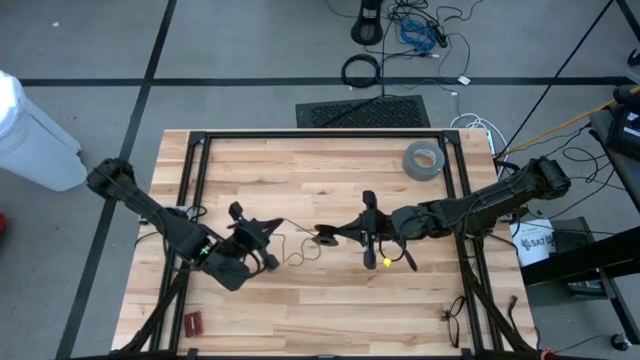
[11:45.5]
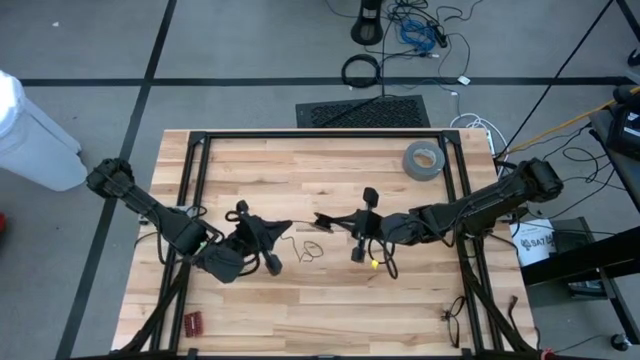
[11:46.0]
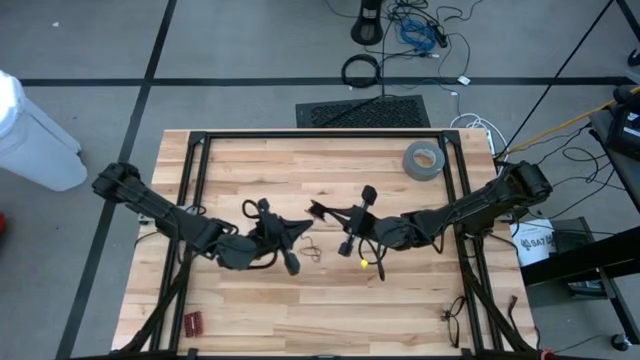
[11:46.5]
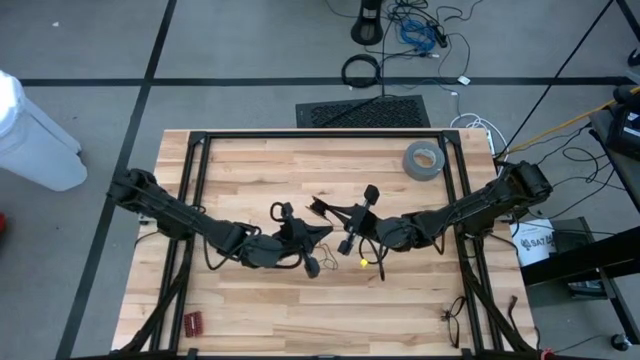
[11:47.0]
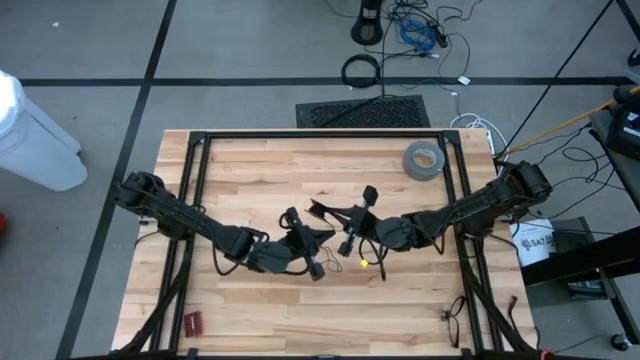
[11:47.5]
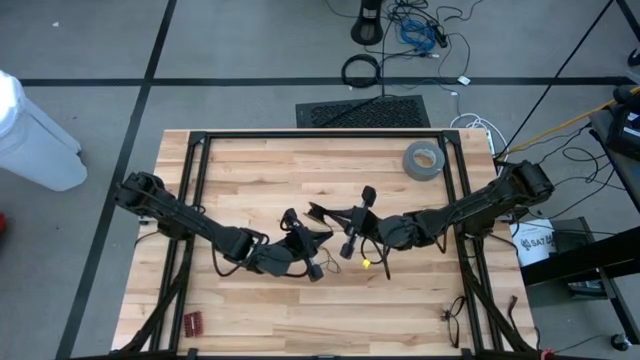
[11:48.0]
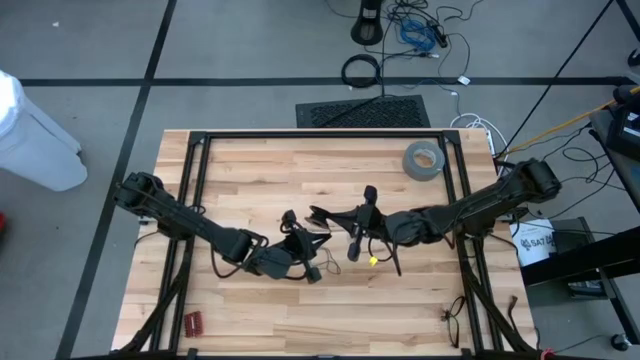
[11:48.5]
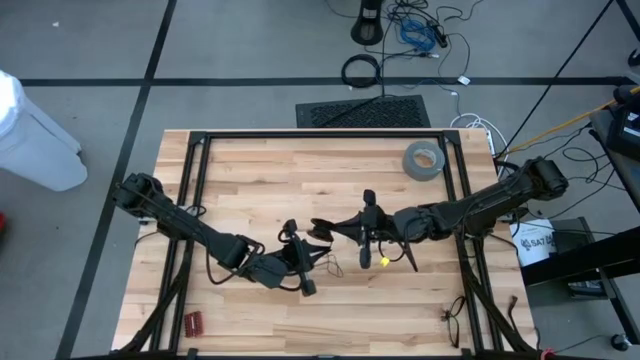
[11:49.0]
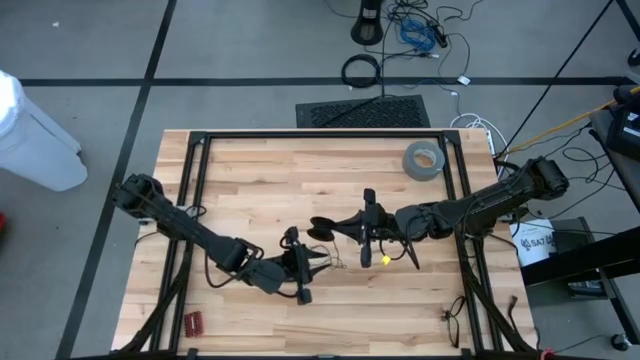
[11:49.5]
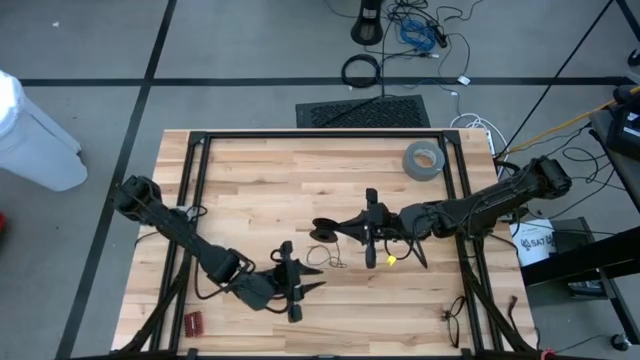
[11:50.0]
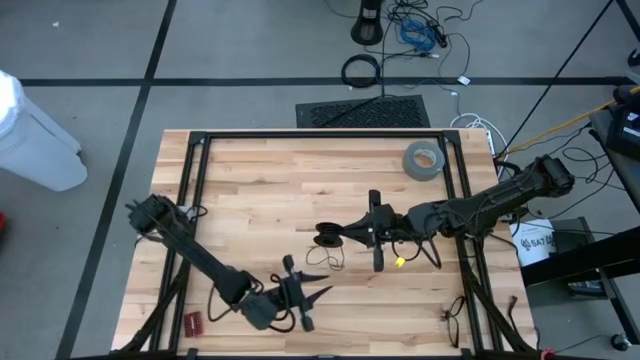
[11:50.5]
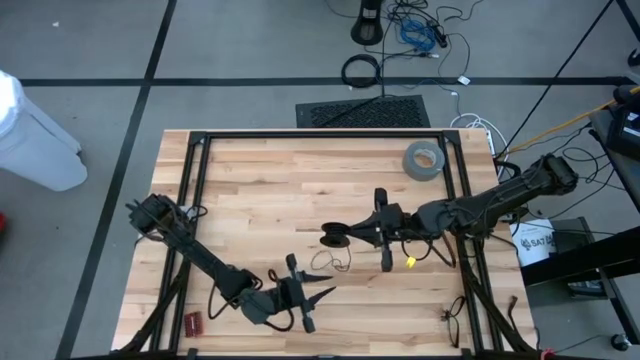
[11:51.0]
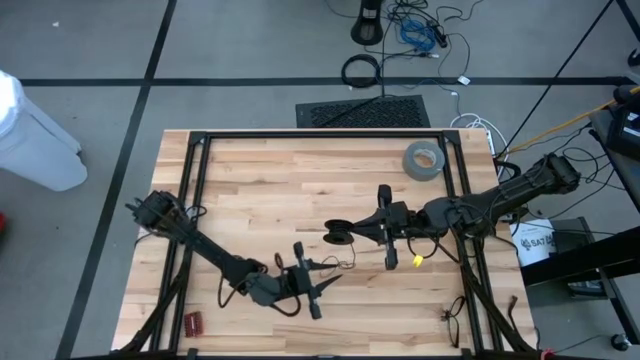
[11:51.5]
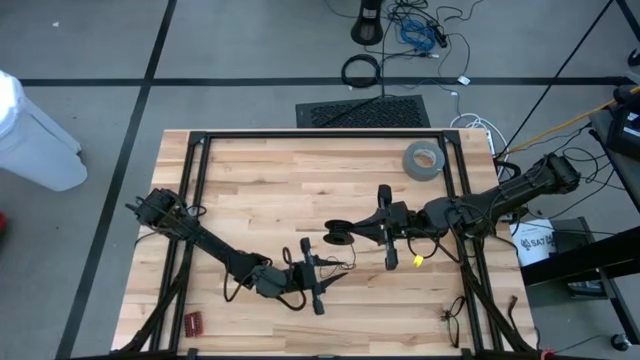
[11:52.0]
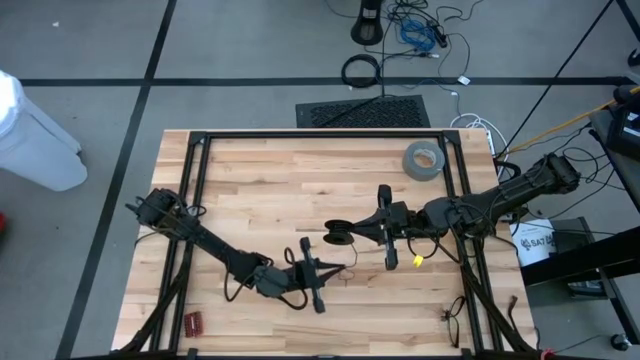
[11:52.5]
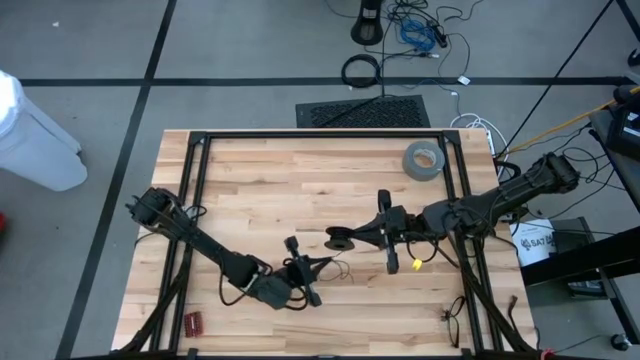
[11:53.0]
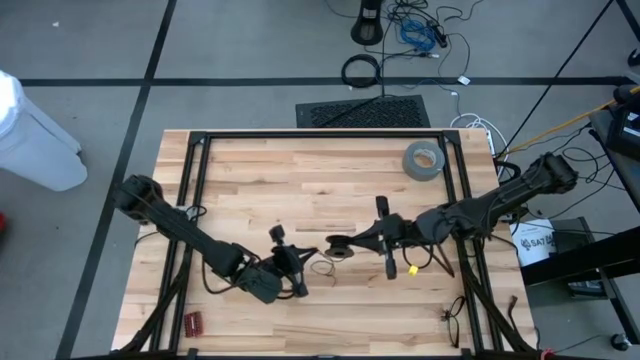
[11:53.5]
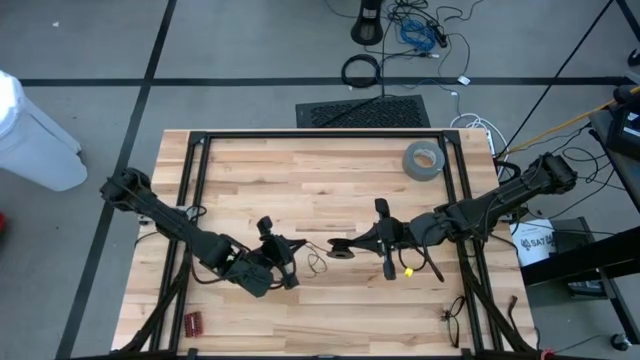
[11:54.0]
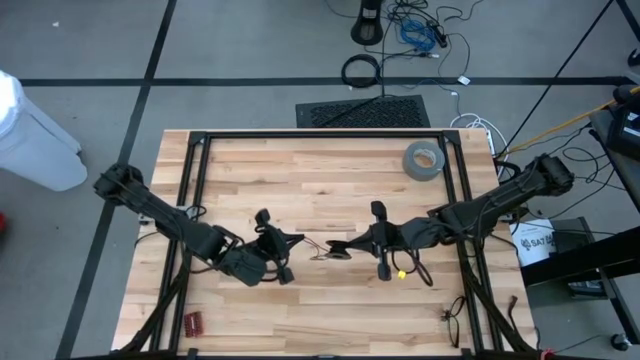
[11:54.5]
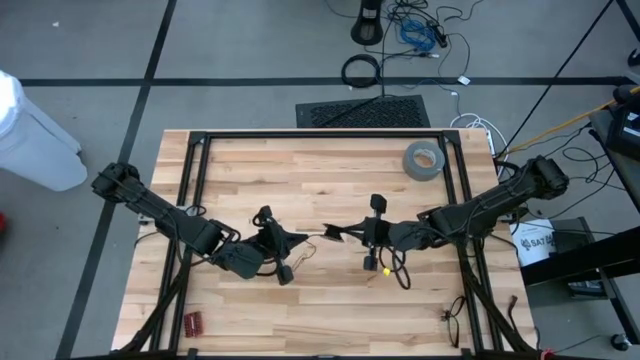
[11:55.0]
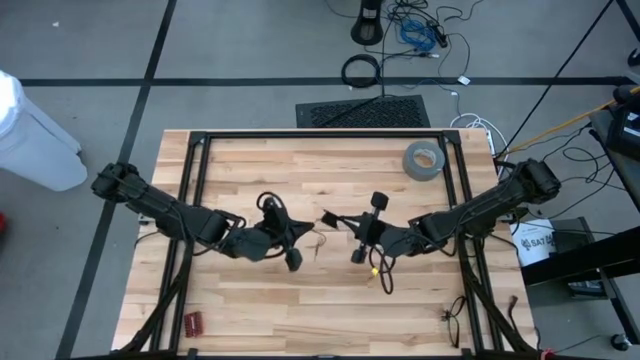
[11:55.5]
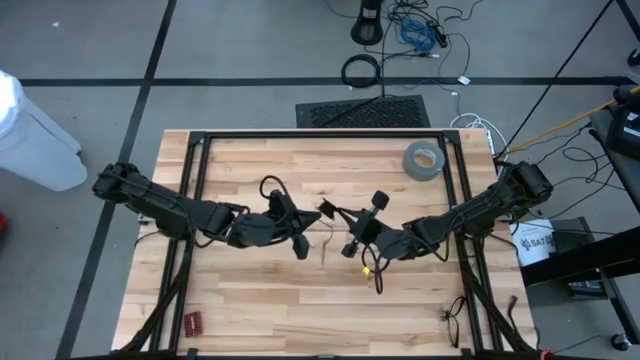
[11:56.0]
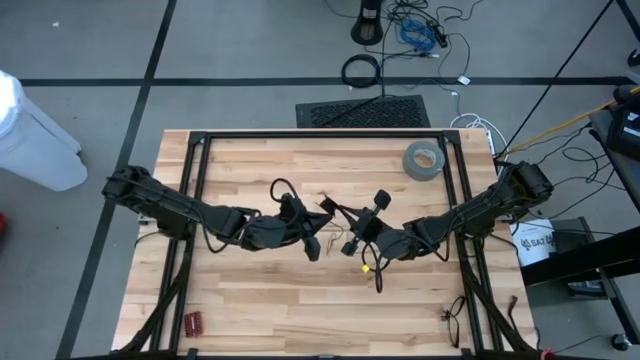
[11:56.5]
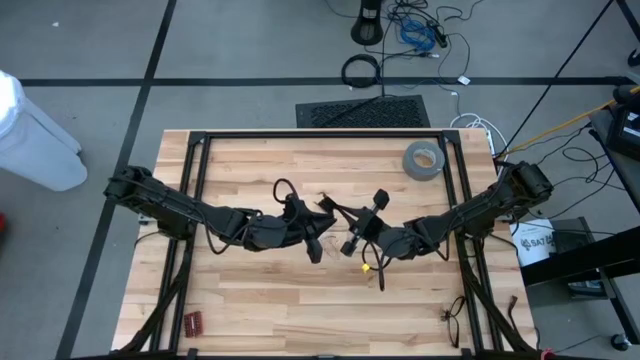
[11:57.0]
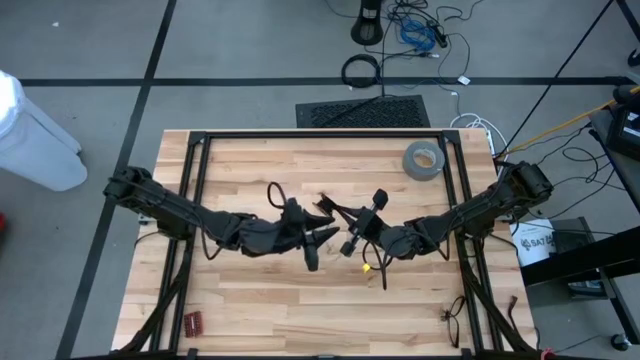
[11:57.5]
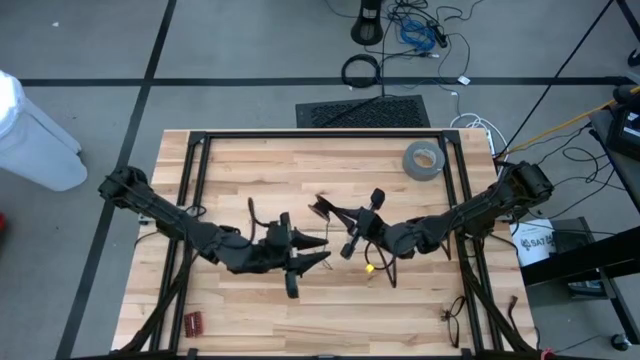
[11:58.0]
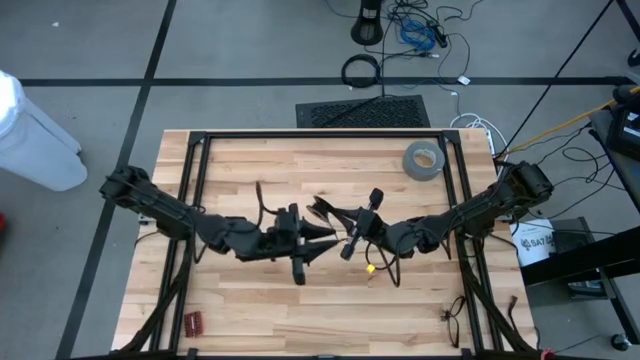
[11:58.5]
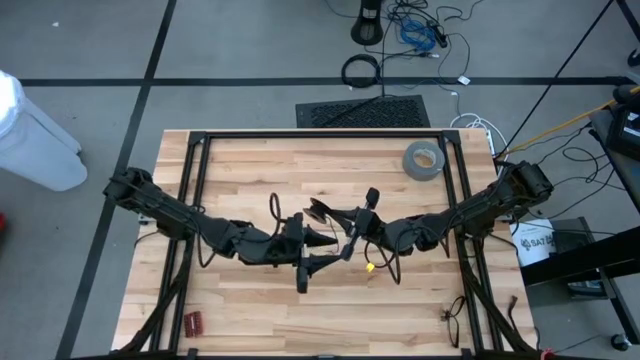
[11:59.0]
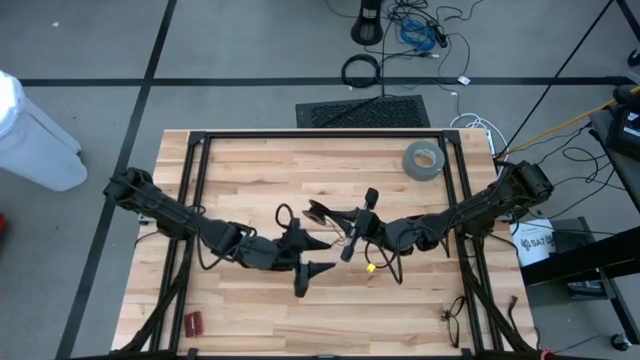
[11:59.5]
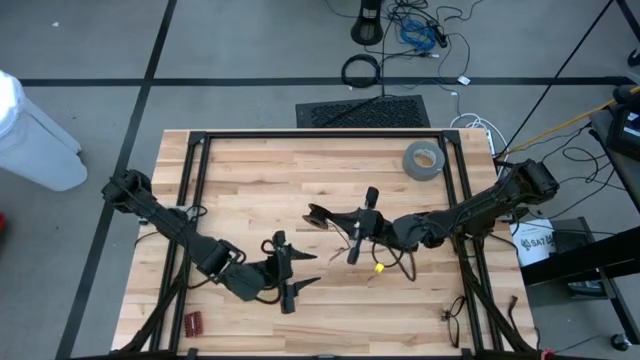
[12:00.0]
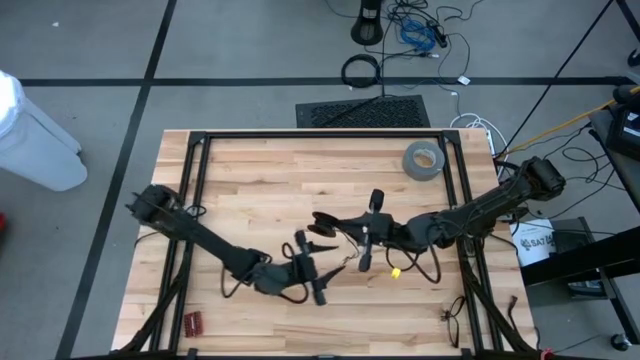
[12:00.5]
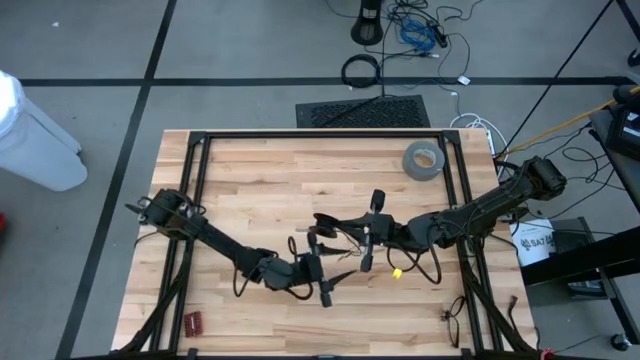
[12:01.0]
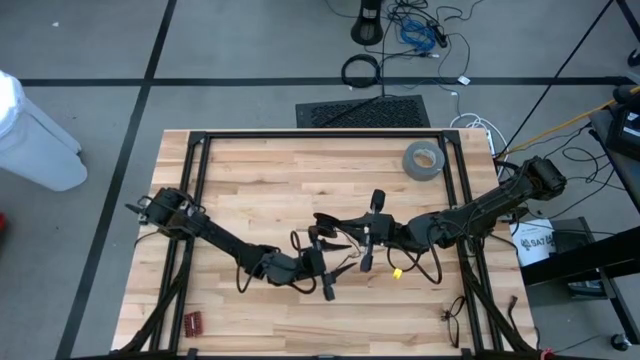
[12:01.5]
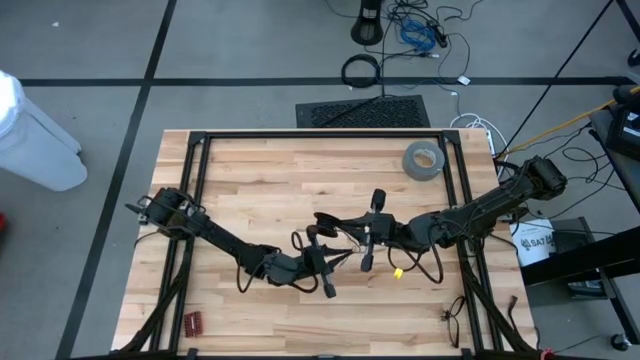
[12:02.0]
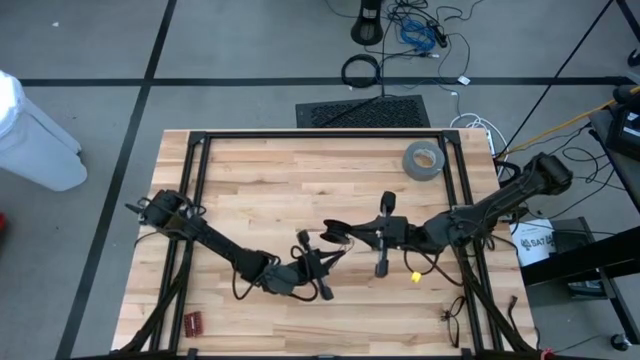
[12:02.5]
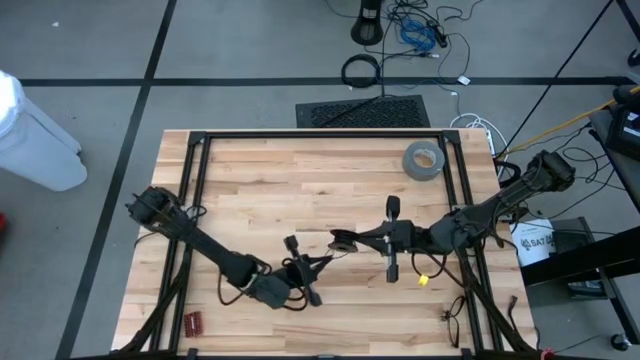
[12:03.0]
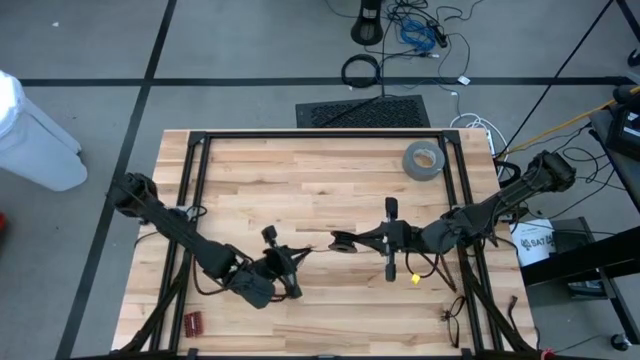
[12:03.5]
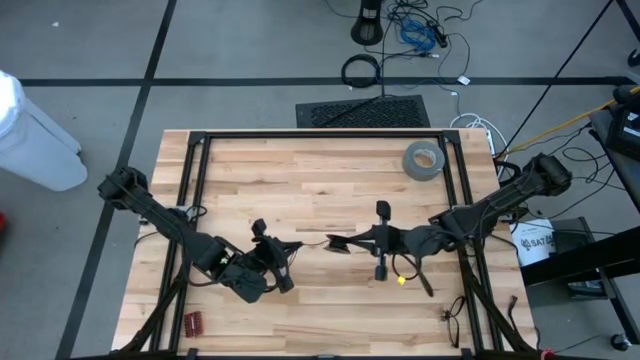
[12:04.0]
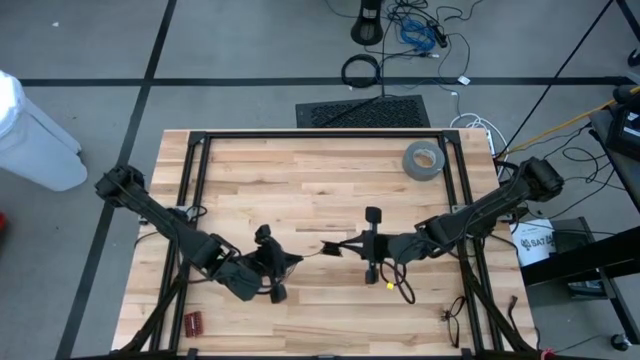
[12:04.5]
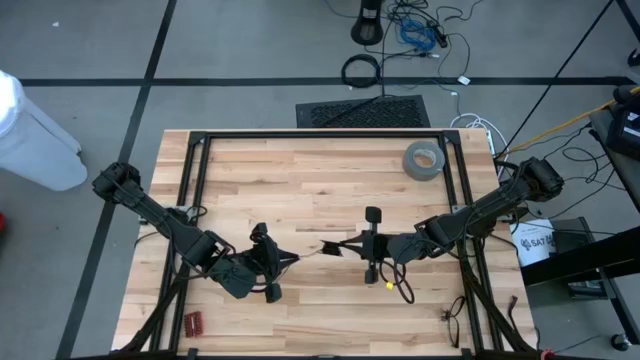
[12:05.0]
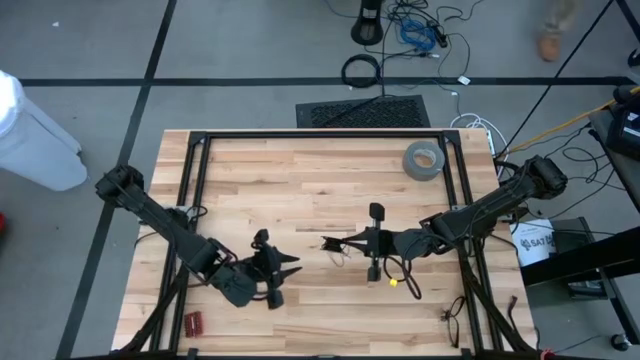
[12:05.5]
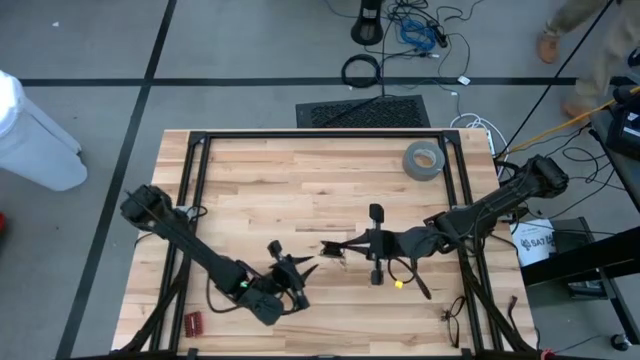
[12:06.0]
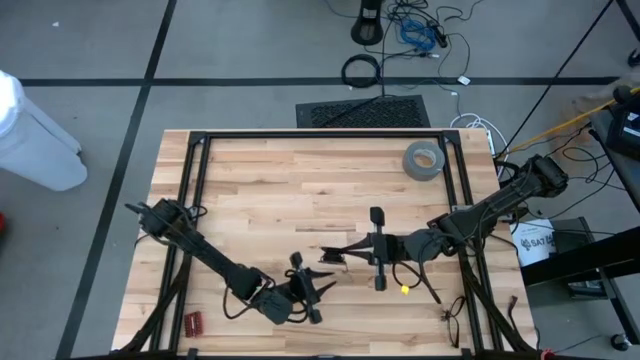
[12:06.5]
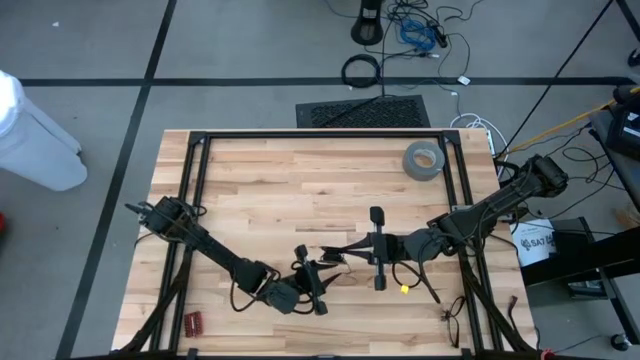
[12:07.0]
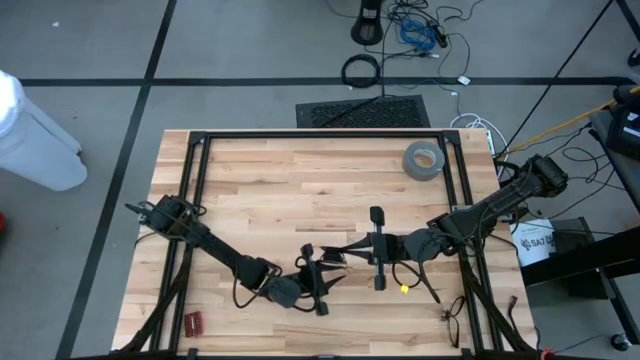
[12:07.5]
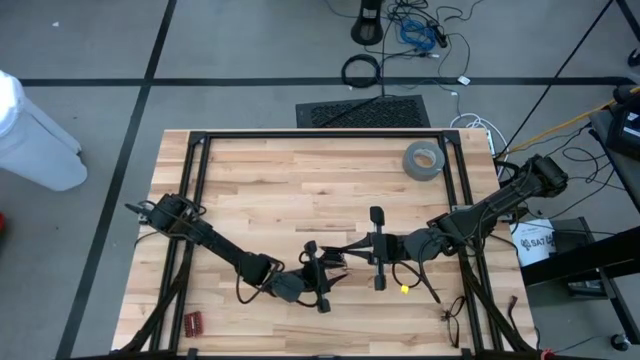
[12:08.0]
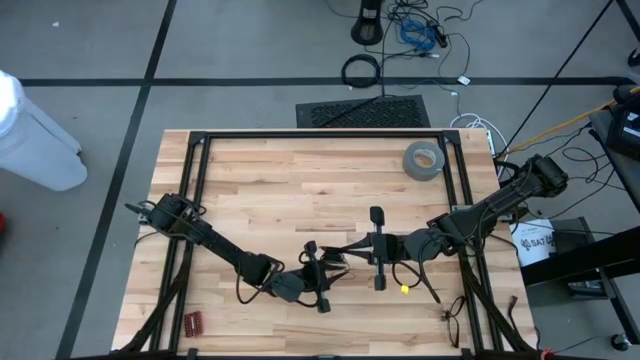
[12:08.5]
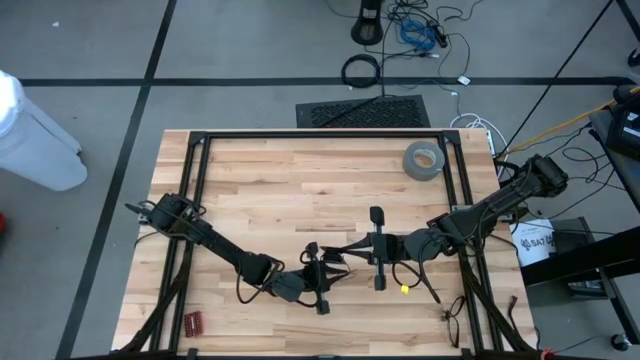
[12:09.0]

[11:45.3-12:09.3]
Task: Coil cords
Coil the black wire onto the spool
